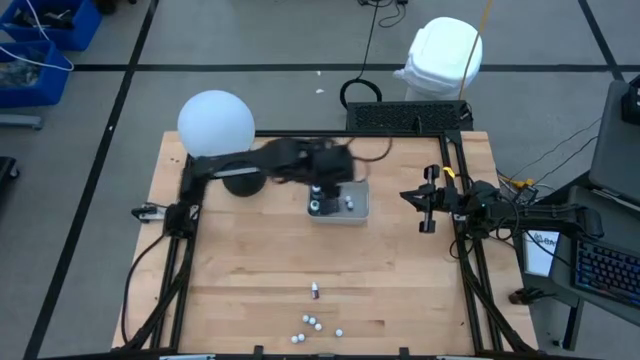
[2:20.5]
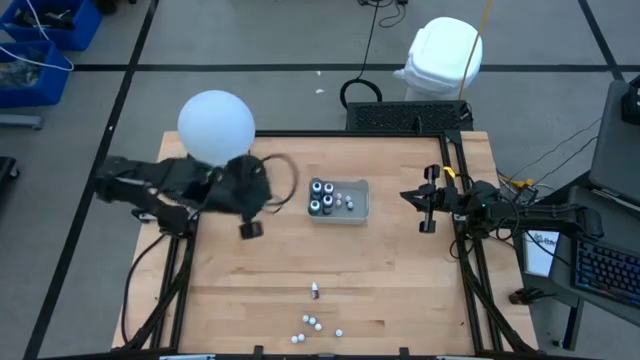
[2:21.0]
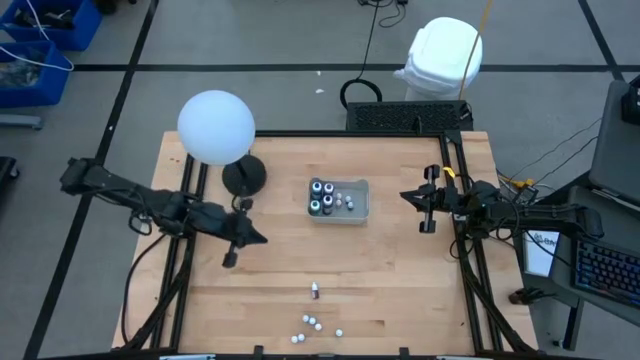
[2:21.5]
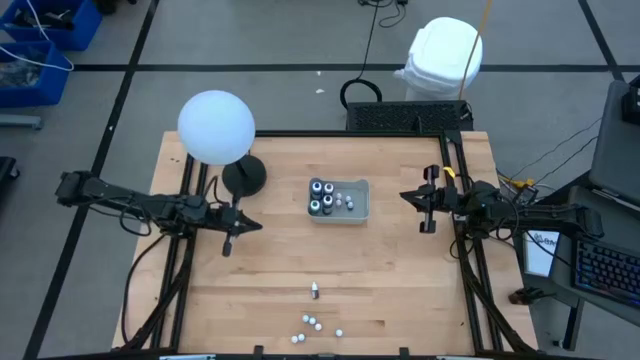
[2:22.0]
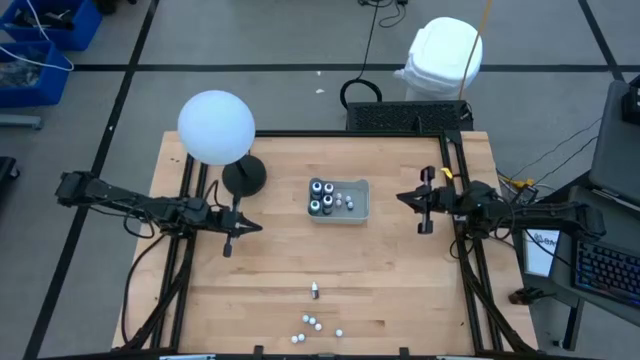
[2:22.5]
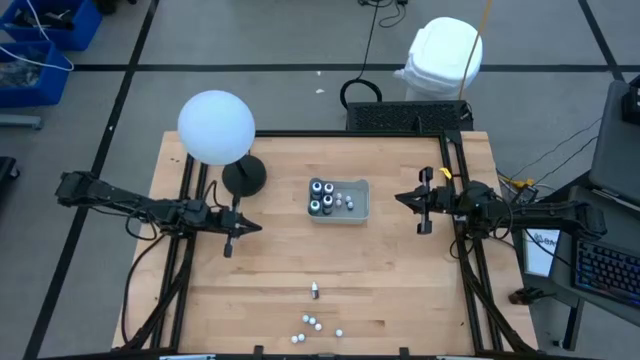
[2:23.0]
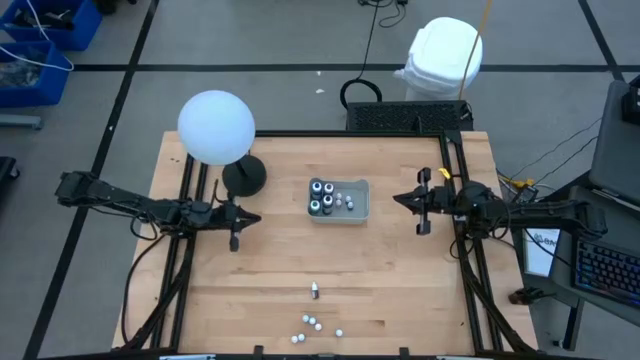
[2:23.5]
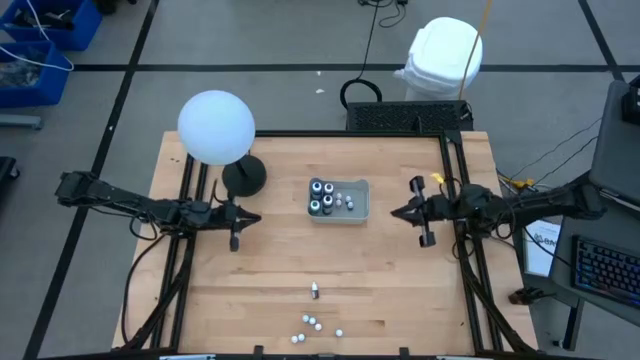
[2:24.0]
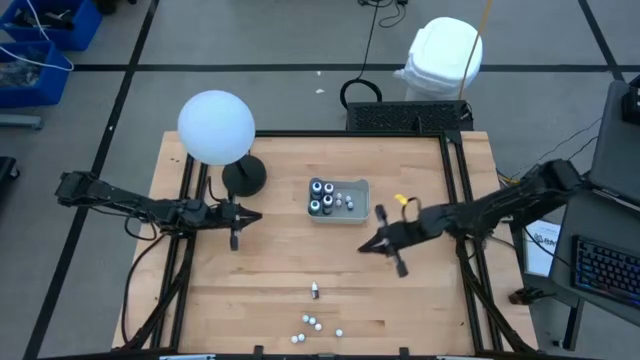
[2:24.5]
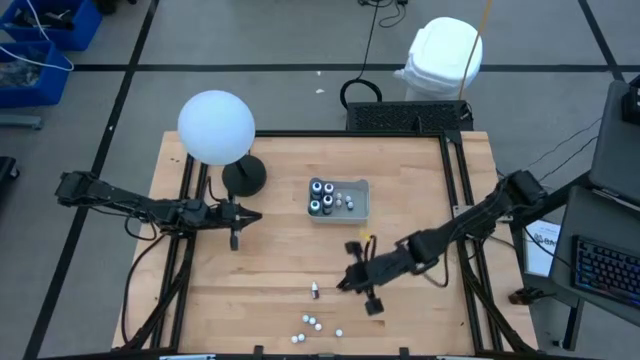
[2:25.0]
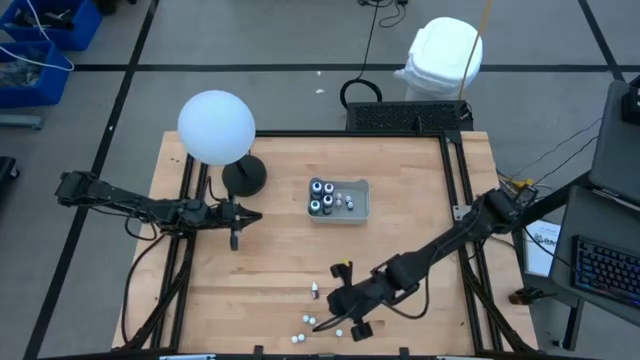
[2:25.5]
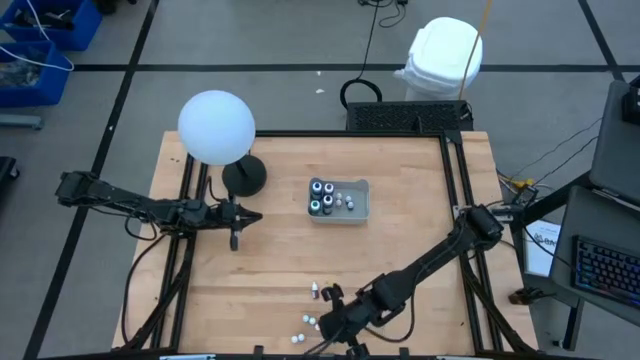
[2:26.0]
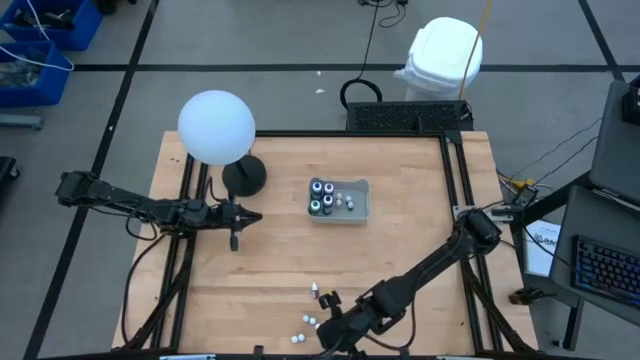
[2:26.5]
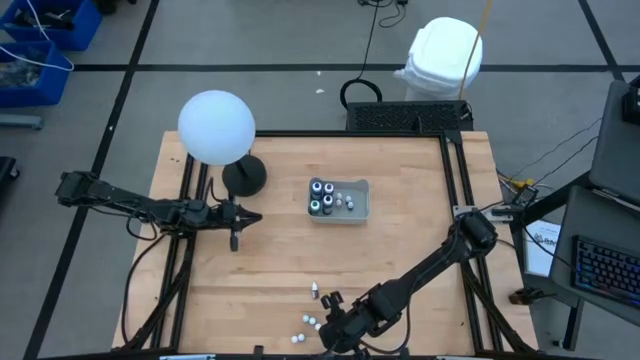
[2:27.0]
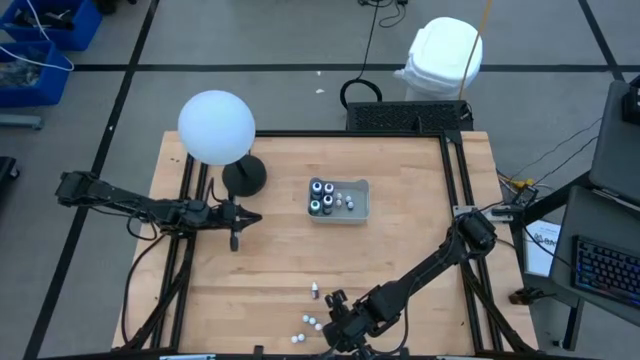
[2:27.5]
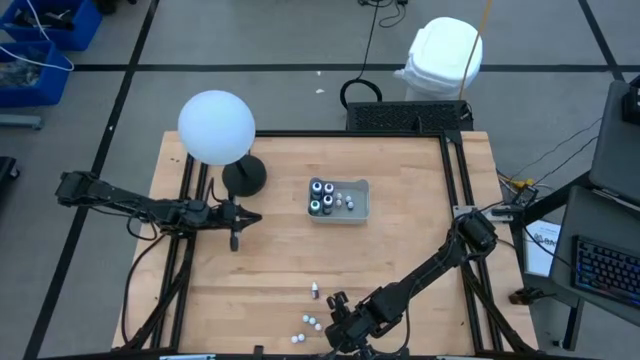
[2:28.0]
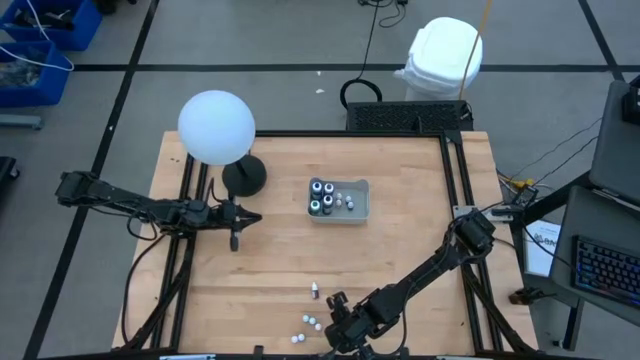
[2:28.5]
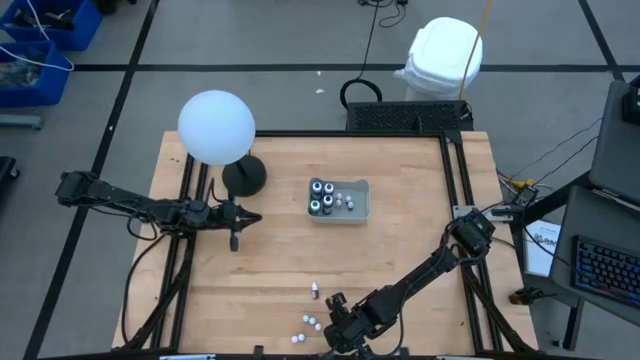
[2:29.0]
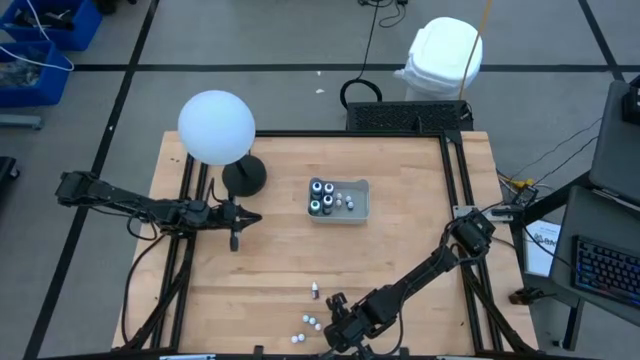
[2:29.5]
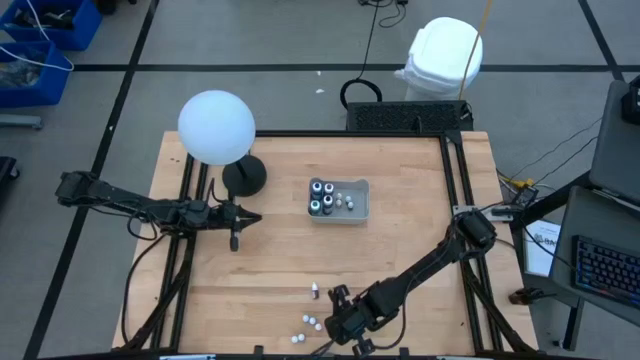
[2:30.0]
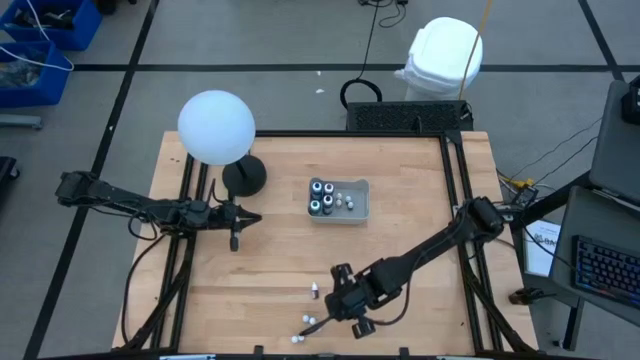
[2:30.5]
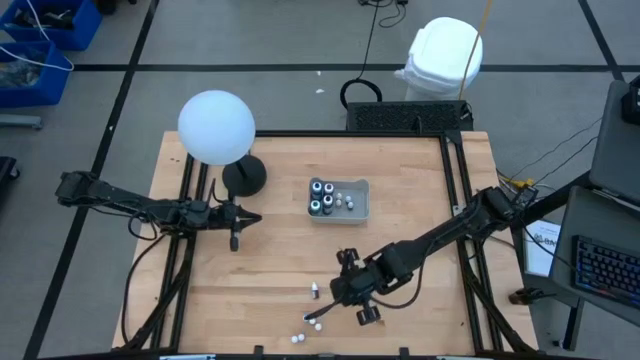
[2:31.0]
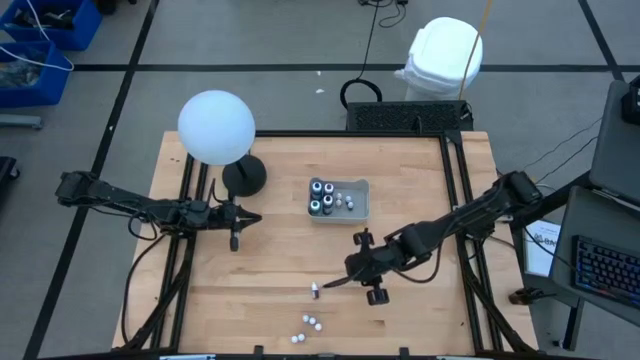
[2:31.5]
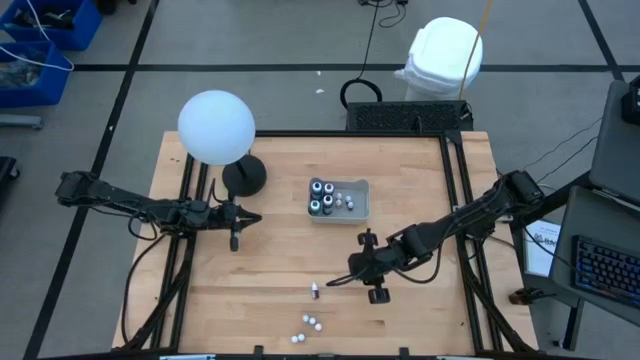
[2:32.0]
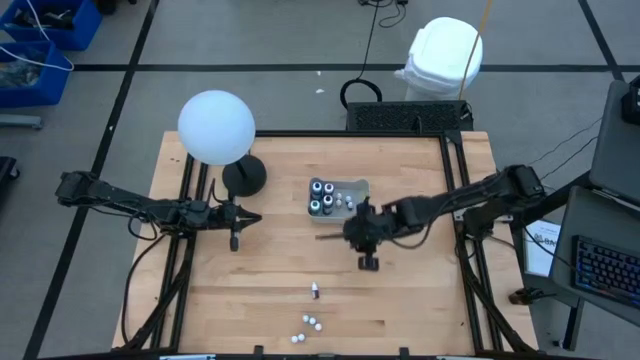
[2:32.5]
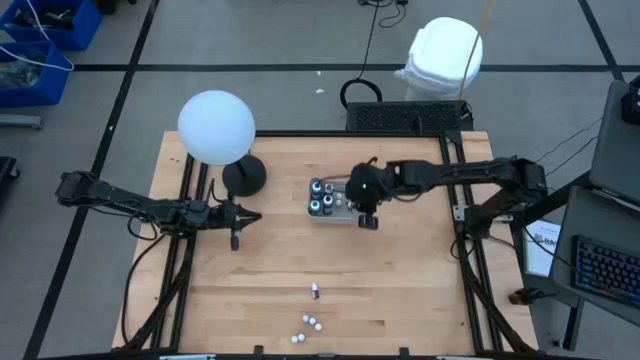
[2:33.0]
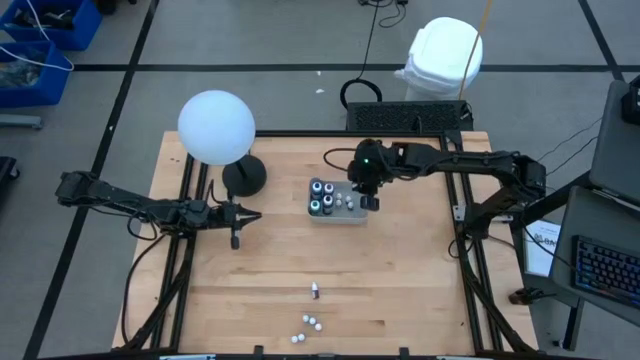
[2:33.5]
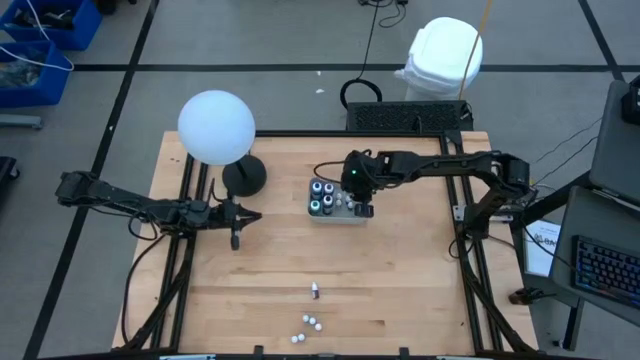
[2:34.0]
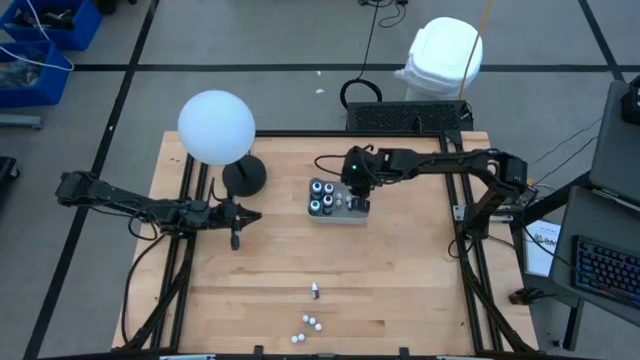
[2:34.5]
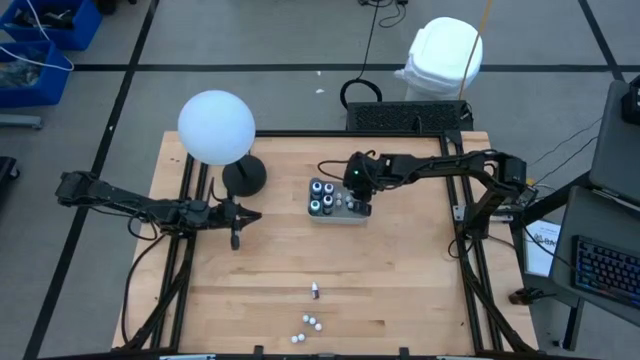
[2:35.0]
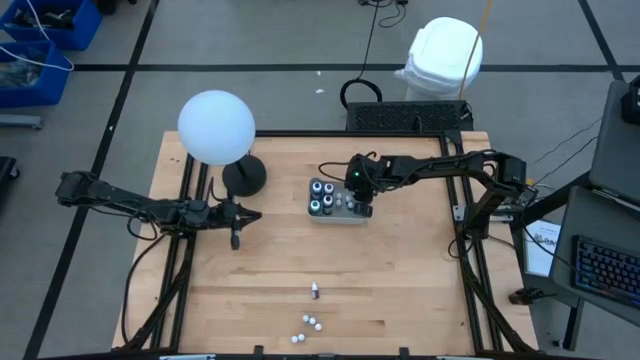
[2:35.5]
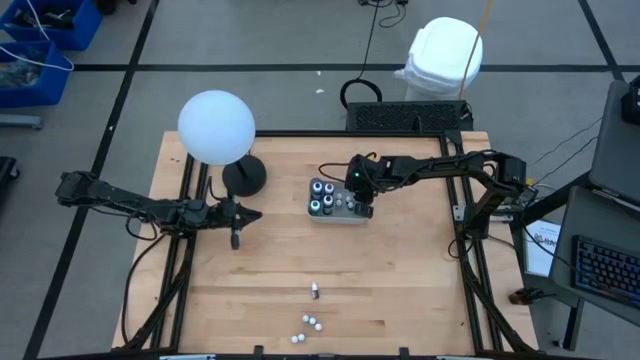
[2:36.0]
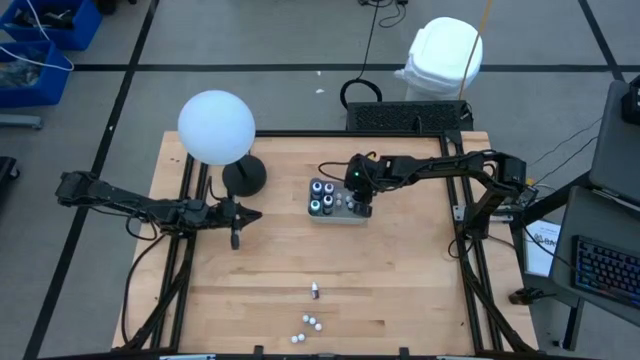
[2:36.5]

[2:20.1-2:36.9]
Task: Pick & Place food coloring
Put the right small purple food coloring bottle into the gray bin

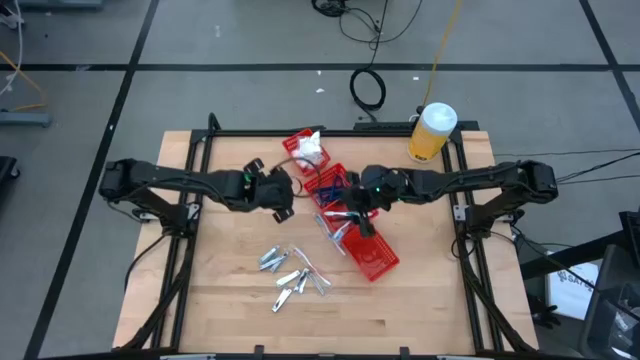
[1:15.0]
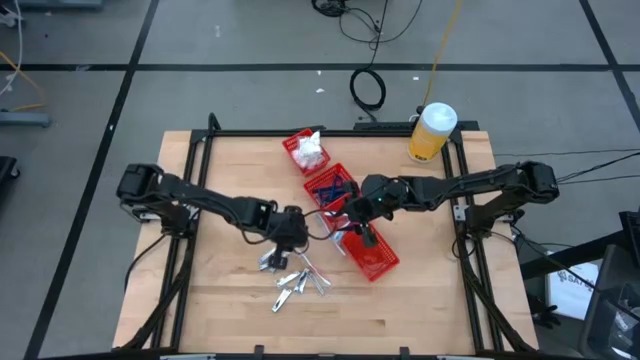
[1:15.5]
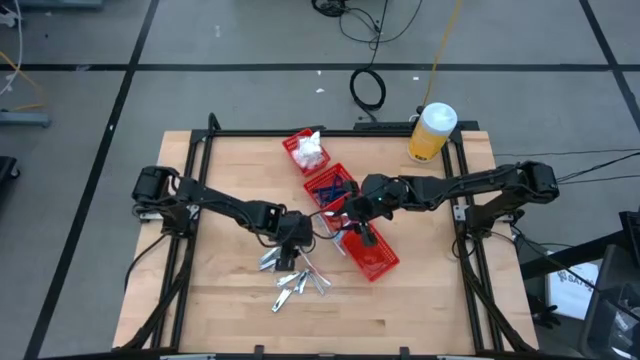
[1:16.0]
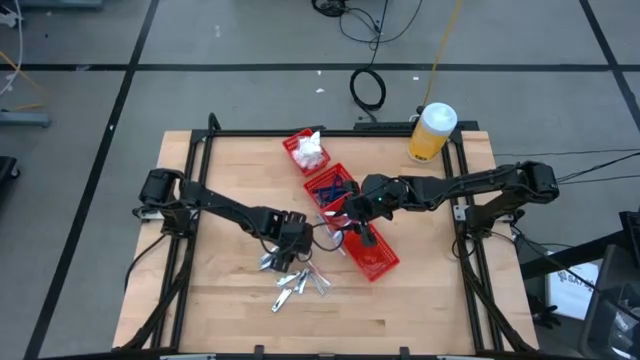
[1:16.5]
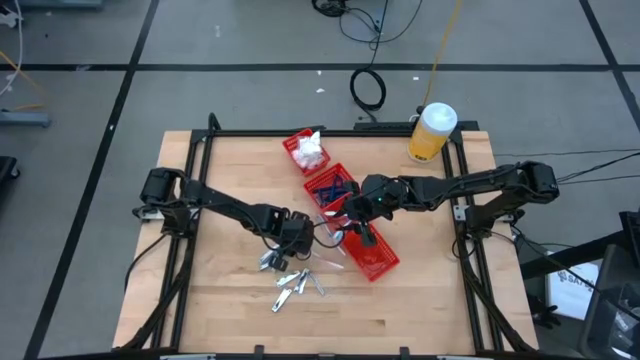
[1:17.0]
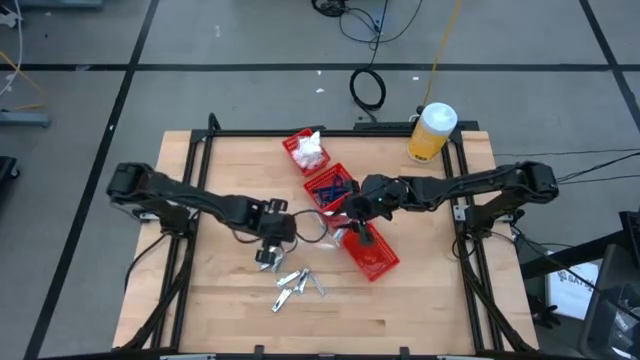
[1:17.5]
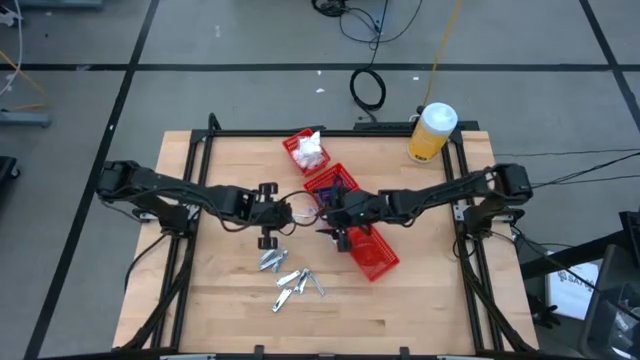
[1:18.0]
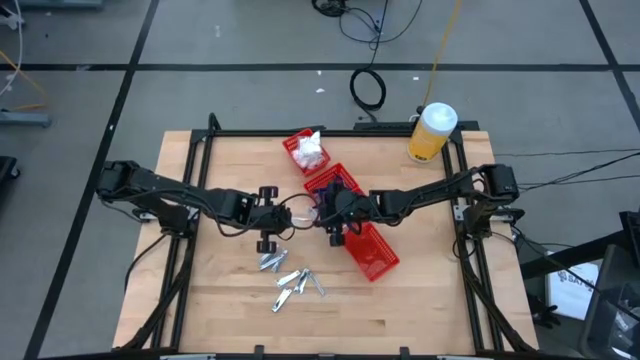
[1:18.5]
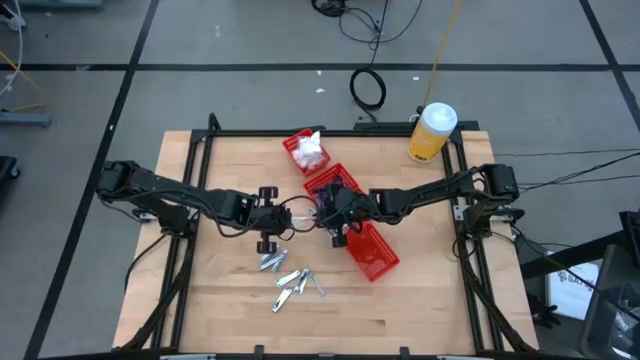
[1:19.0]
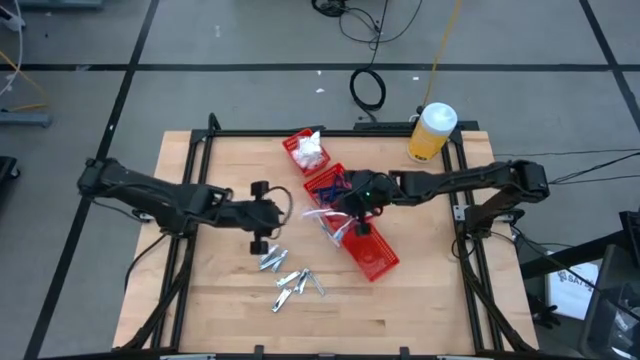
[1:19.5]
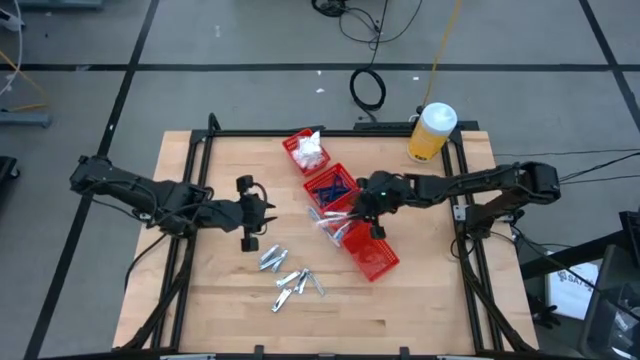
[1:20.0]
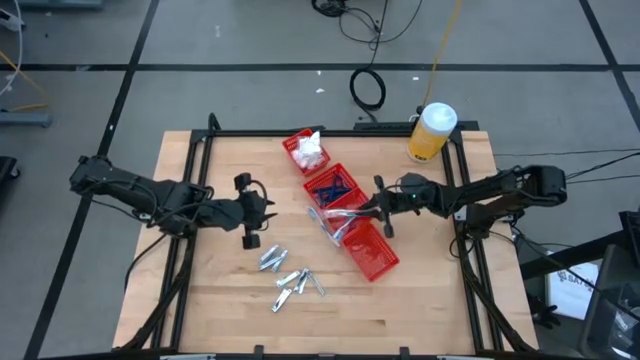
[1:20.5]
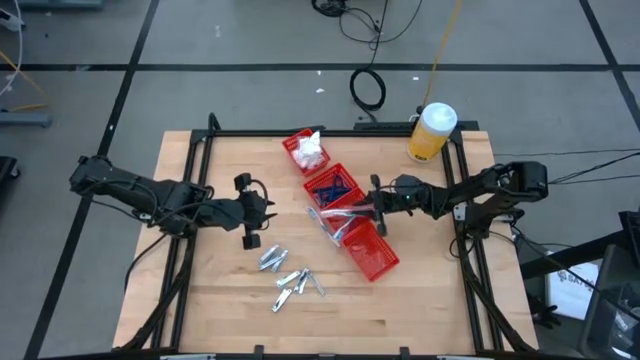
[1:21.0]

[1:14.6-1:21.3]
Task: Pick & Place Travel size toiletries
Put the orange toothbrush into the bottom middle red bin
